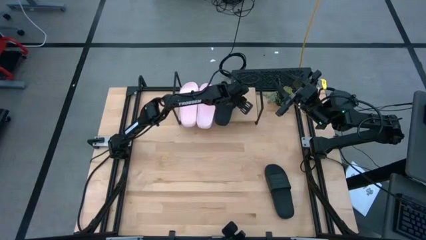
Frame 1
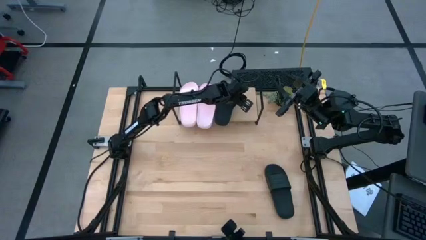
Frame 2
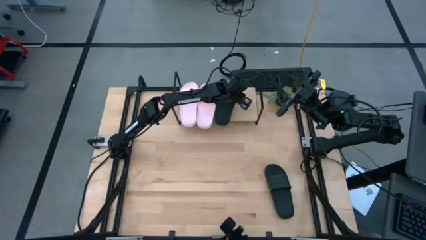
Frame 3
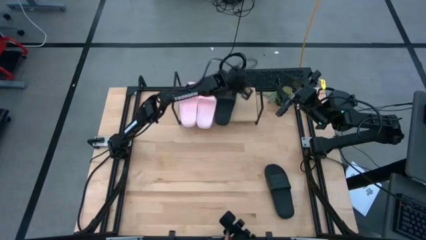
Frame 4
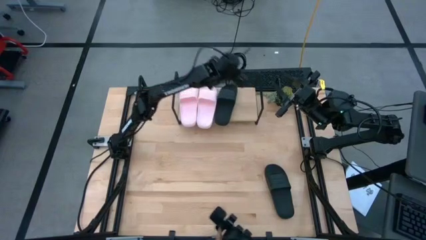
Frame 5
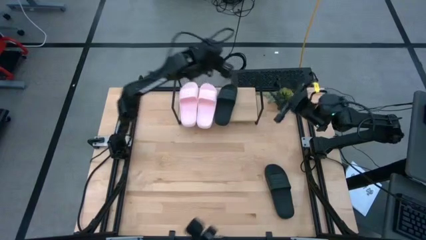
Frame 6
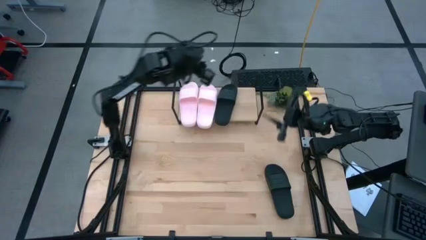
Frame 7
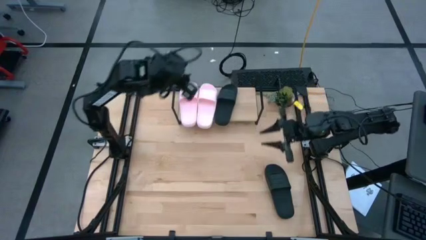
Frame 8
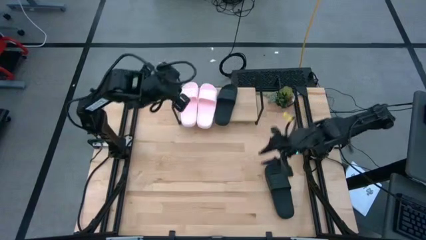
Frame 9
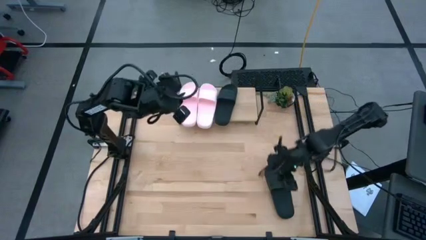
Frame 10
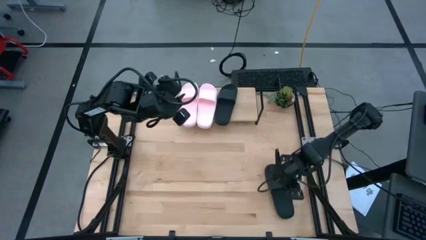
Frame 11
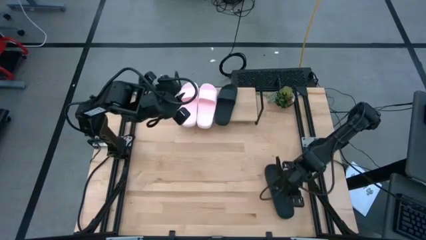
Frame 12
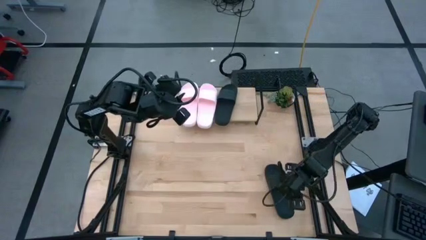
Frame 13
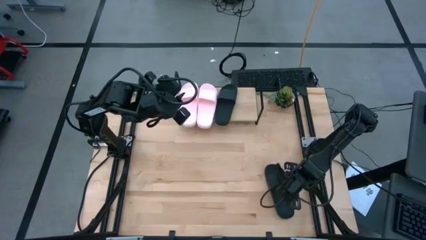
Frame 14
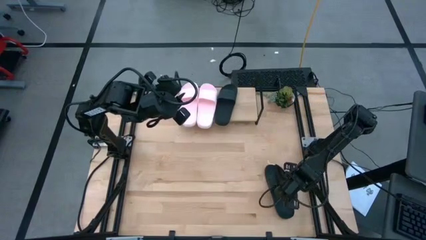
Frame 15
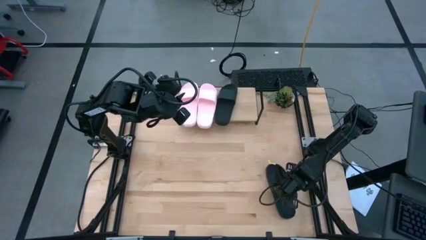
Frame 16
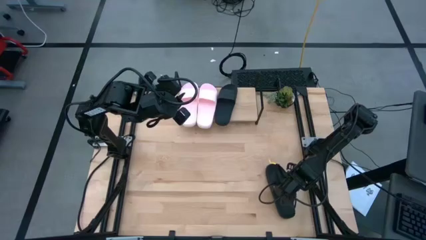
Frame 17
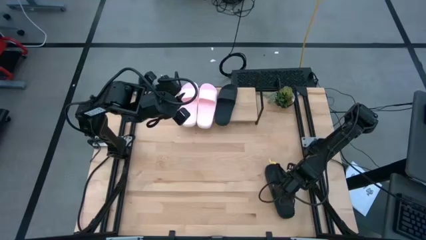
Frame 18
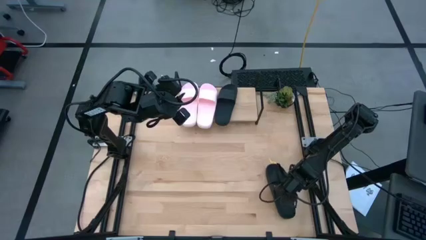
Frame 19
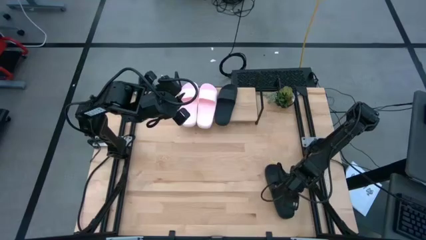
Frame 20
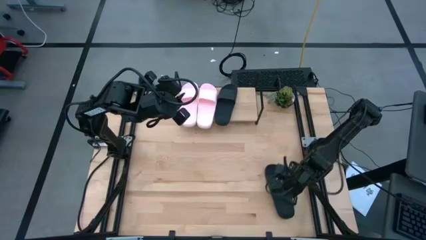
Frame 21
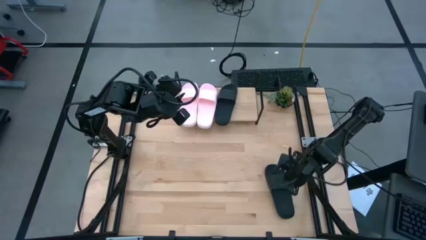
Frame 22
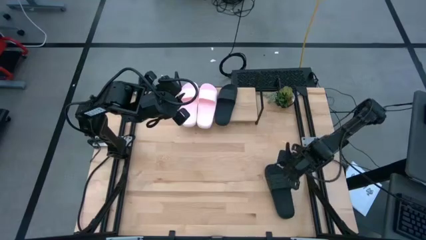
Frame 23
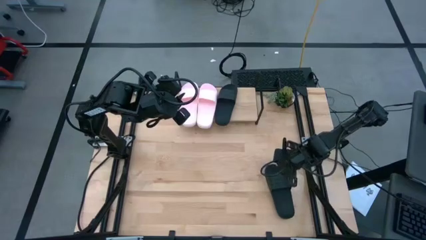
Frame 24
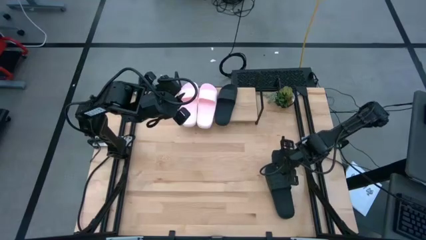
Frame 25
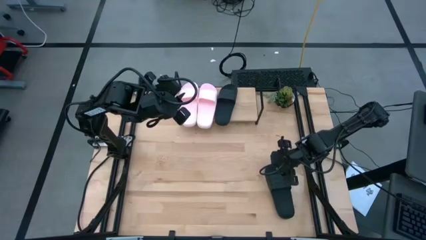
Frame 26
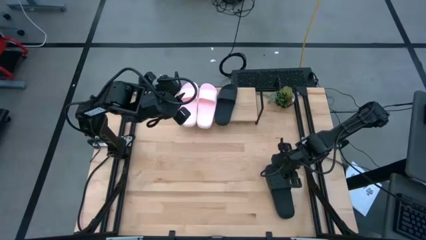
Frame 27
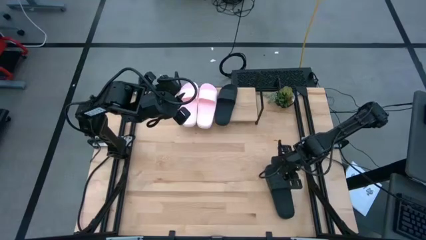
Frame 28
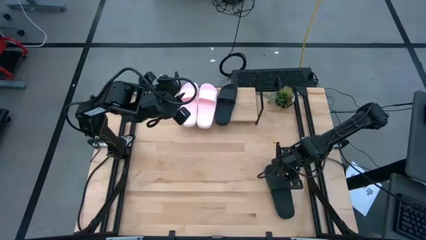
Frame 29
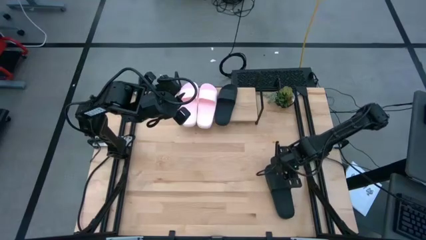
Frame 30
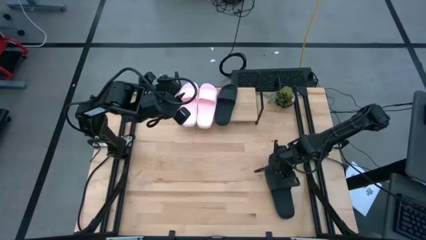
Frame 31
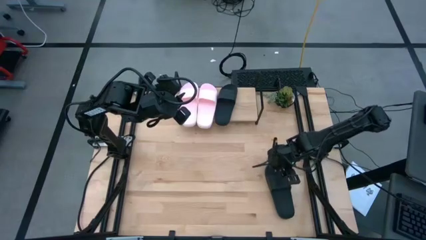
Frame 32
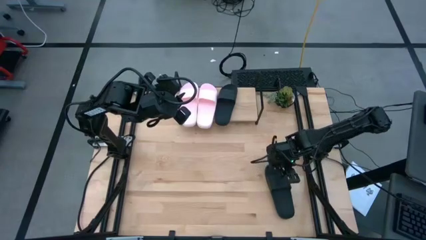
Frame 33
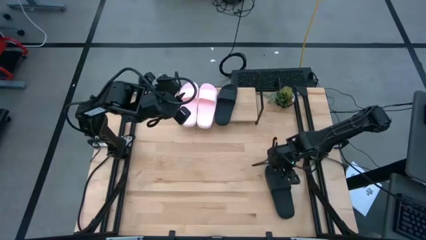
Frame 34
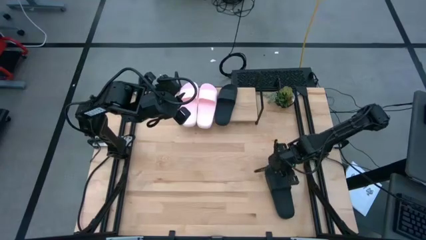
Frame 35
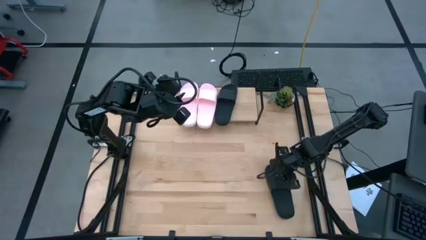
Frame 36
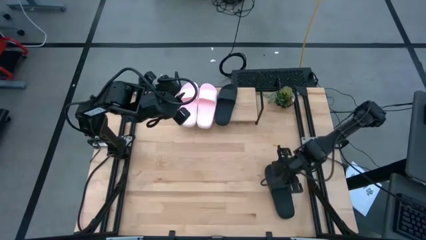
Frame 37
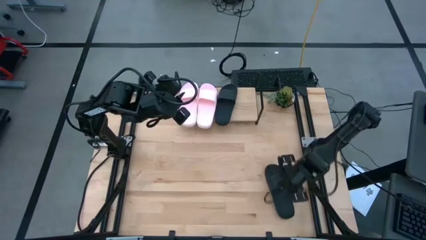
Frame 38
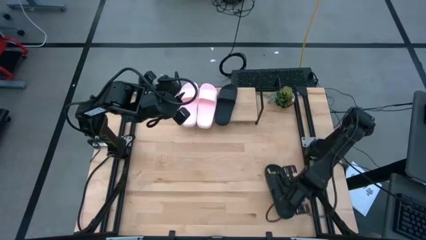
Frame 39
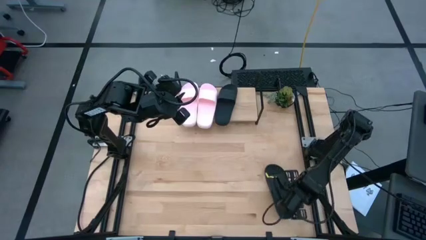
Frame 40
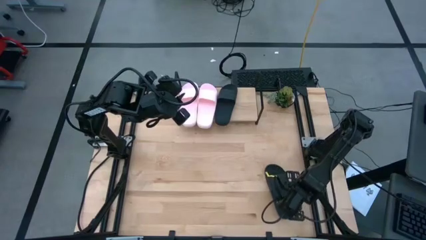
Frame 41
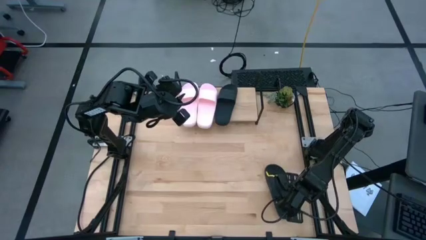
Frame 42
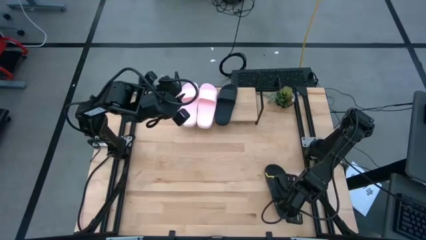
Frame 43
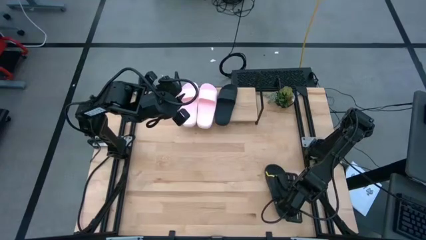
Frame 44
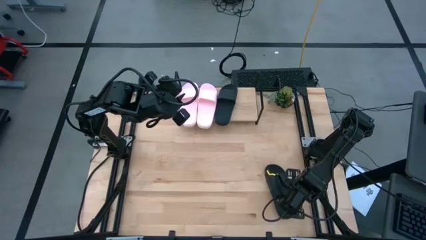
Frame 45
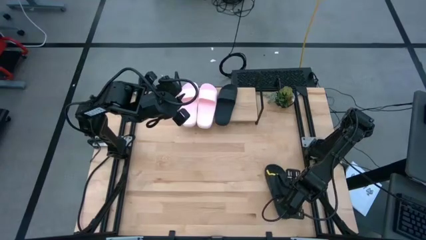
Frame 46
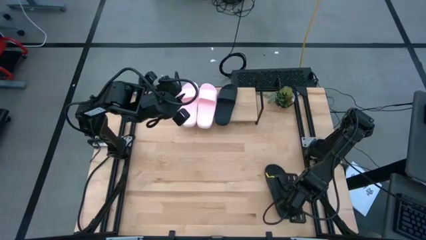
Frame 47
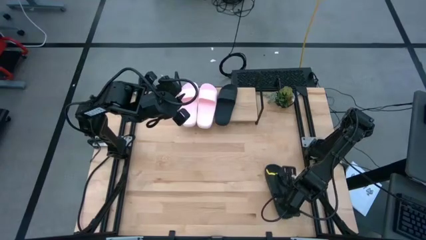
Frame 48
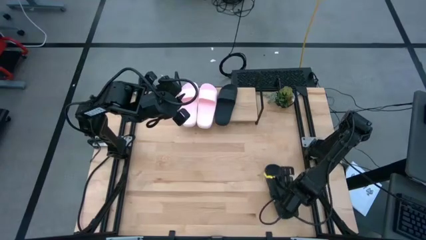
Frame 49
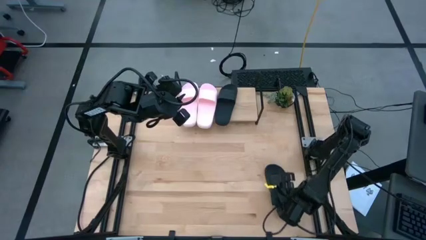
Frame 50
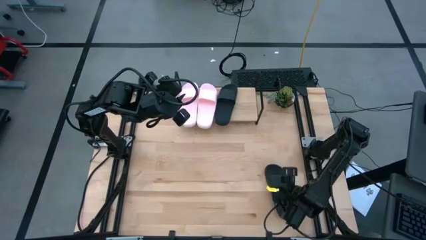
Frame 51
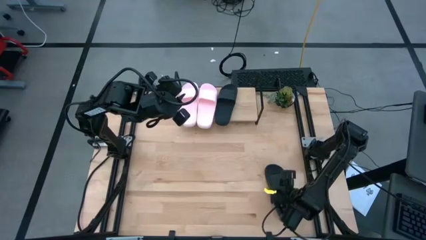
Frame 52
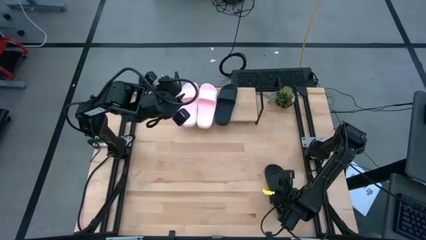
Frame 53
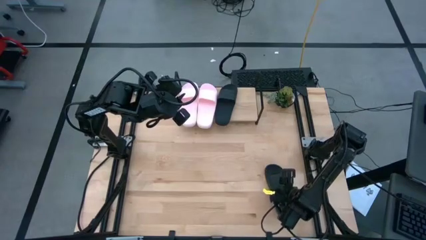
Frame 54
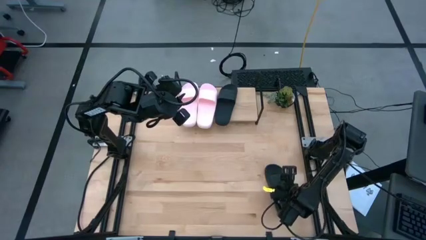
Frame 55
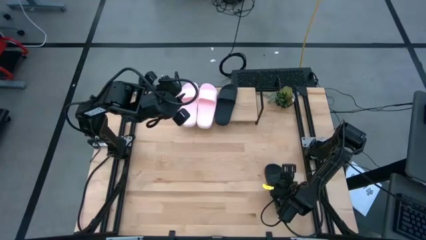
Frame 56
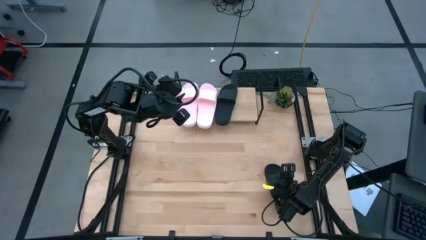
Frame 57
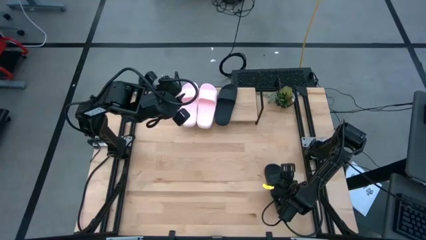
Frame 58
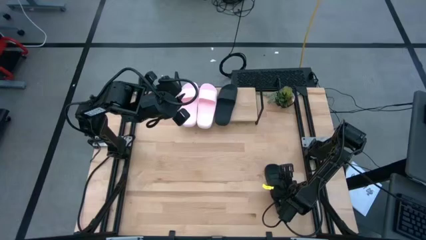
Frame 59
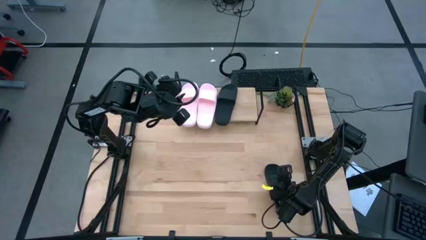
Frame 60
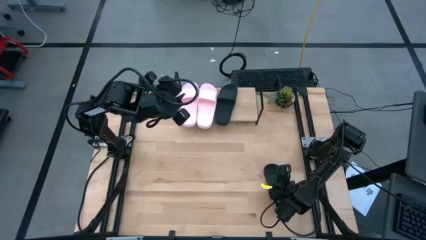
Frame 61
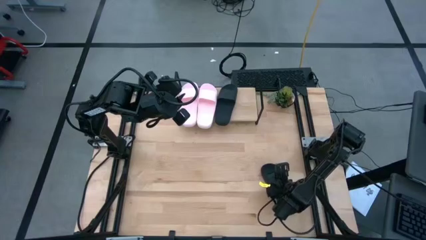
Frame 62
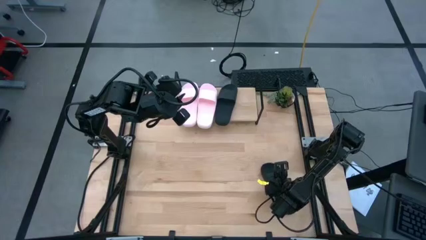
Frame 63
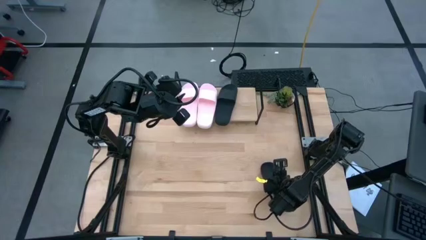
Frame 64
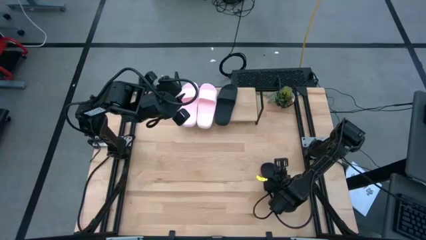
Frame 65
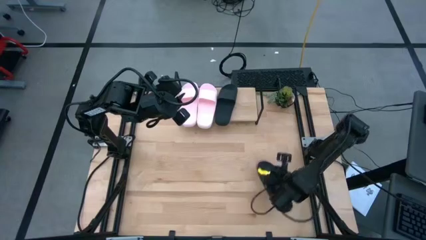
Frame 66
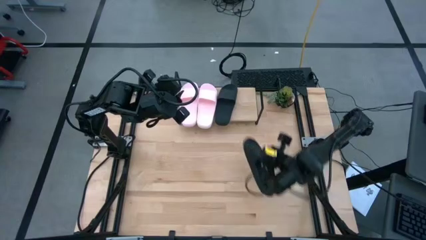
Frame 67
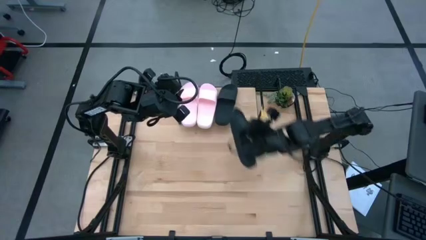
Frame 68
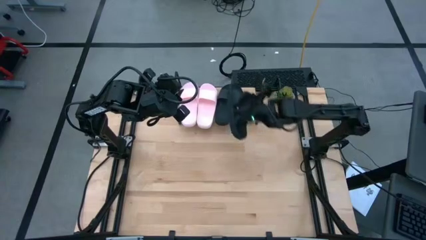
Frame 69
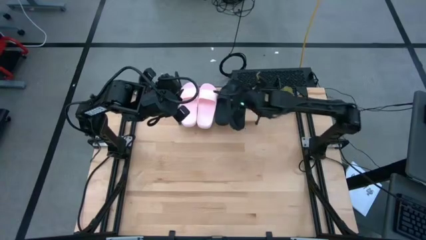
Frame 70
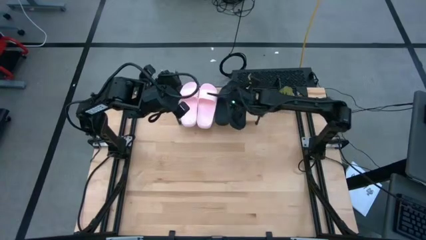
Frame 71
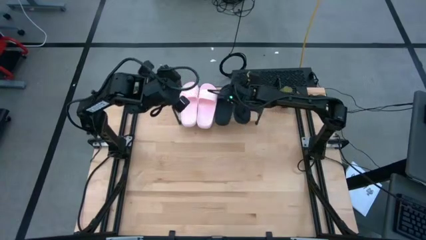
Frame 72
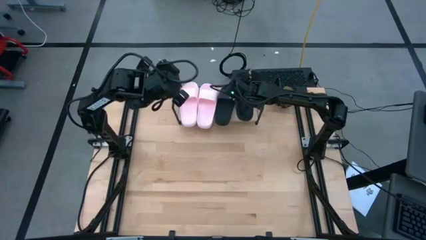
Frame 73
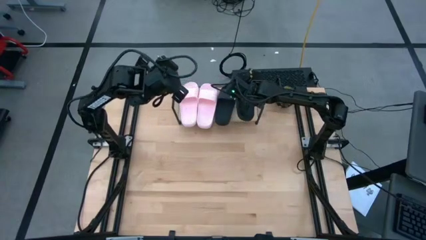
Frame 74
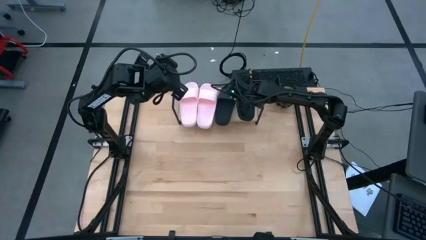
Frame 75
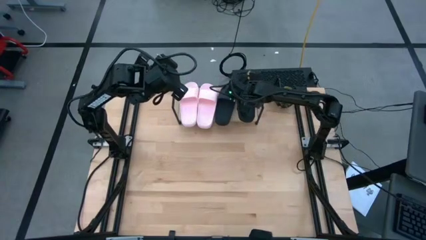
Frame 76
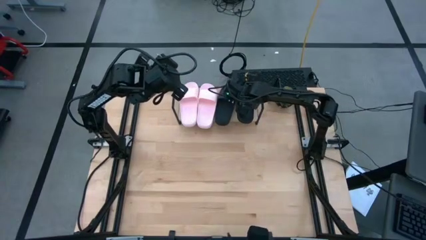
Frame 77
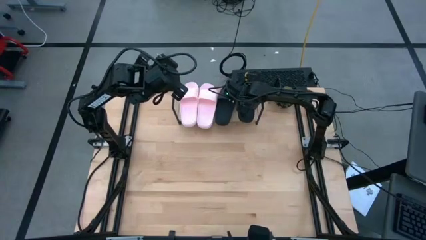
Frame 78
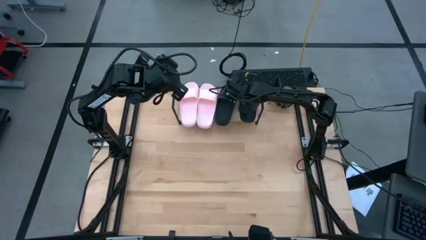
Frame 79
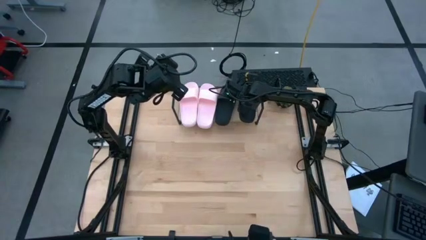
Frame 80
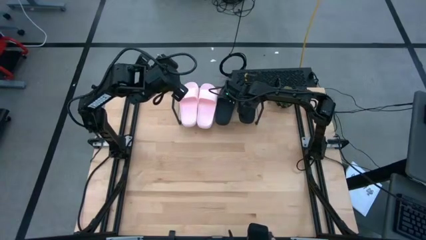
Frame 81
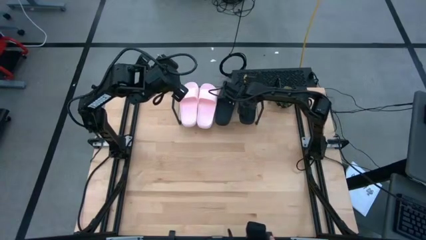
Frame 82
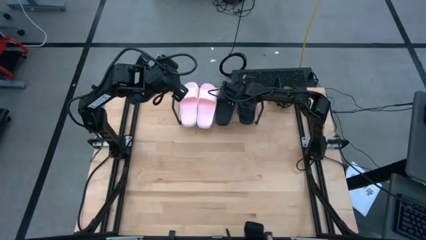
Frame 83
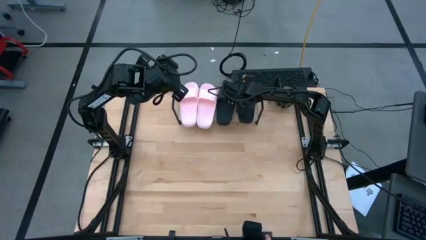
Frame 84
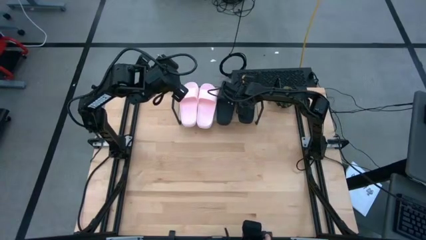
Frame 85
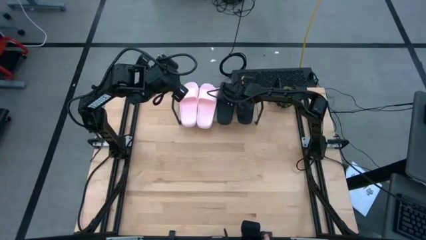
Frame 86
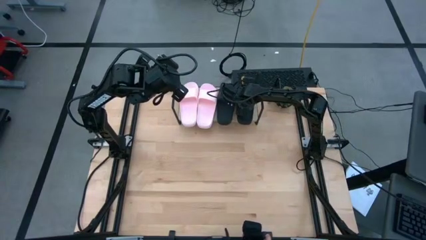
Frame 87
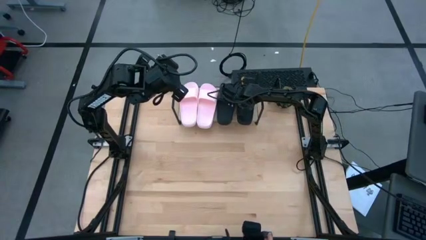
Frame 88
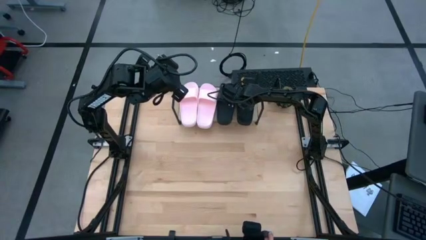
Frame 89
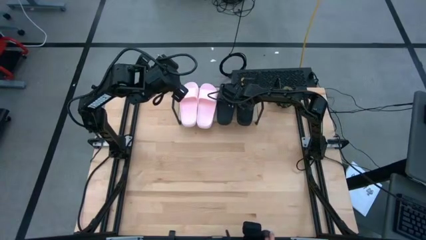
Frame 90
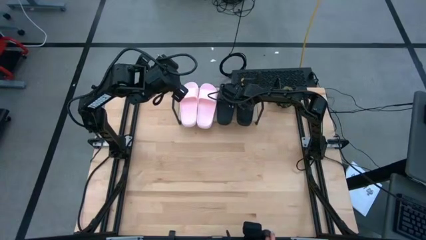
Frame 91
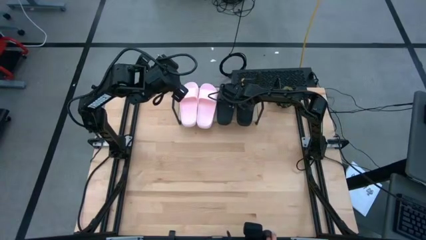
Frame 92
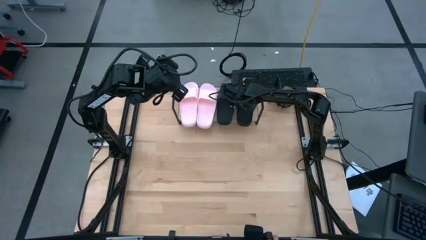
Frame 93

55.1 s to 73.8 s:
Task: Pick and place slides into the shelf
Put the black slipper on the shelf
